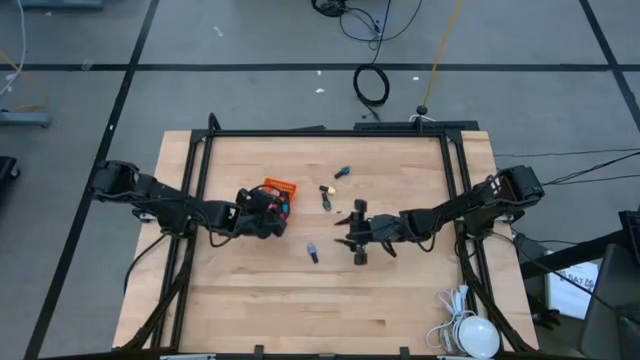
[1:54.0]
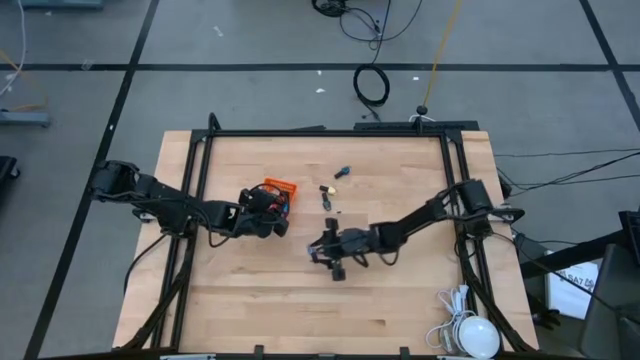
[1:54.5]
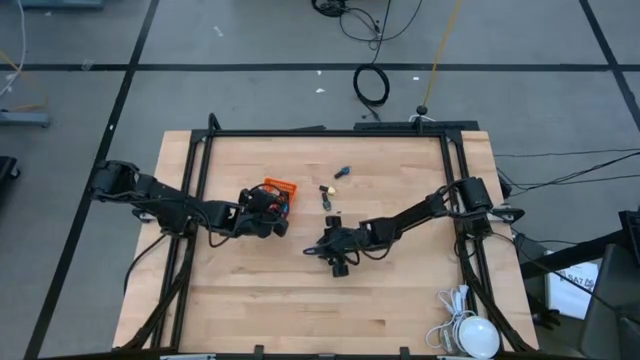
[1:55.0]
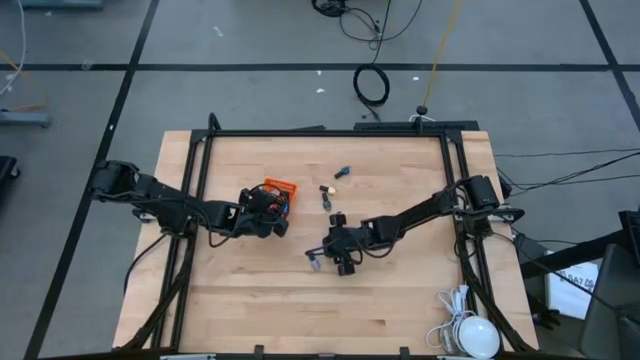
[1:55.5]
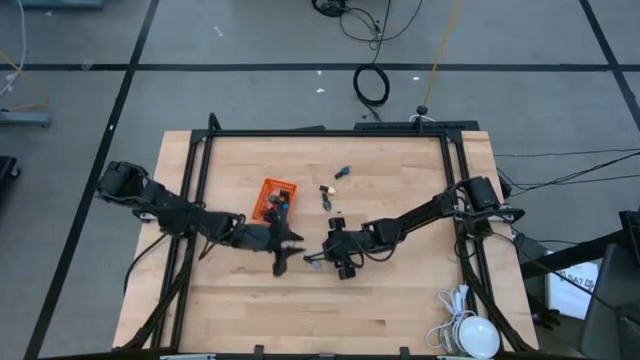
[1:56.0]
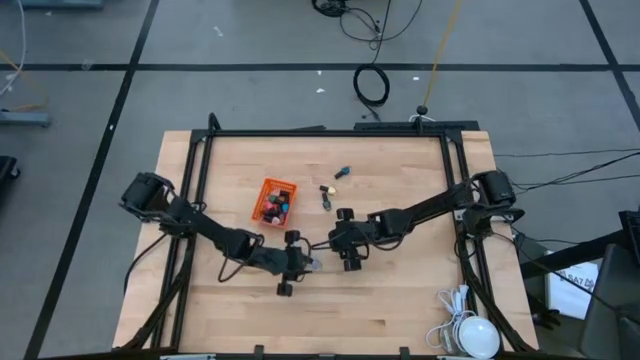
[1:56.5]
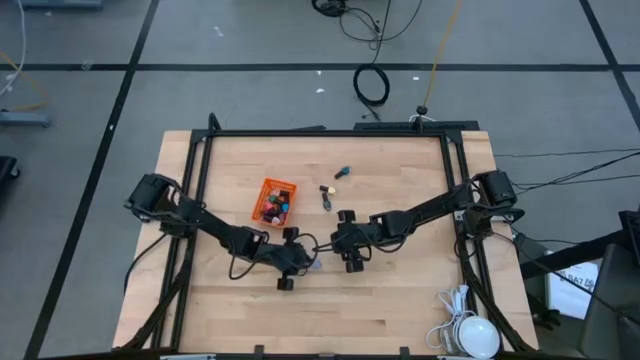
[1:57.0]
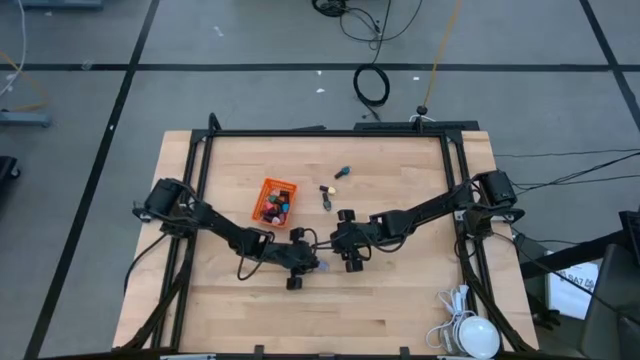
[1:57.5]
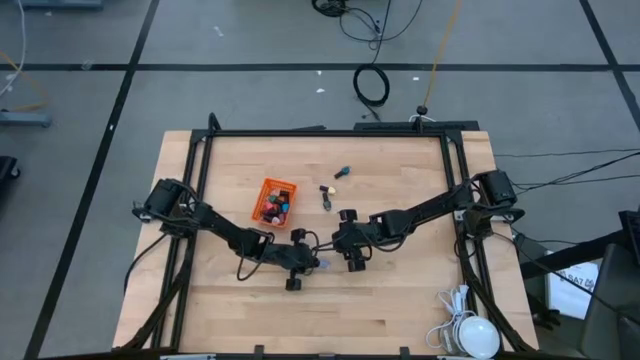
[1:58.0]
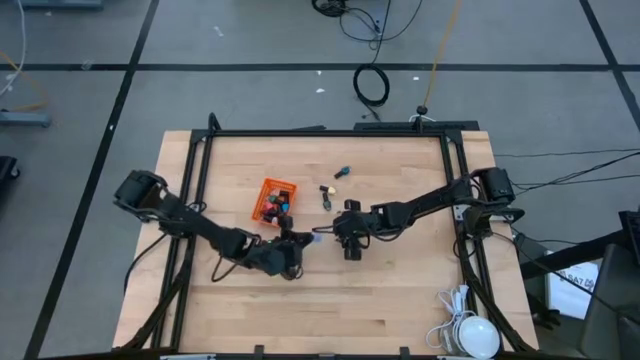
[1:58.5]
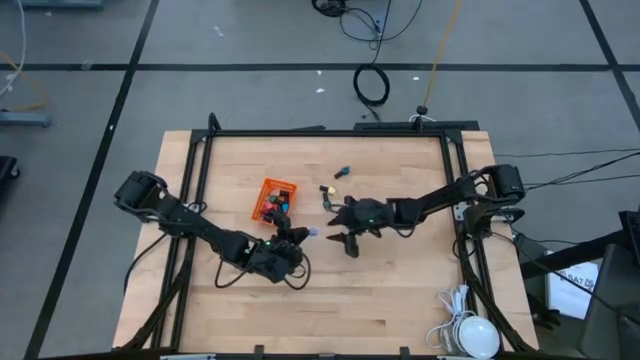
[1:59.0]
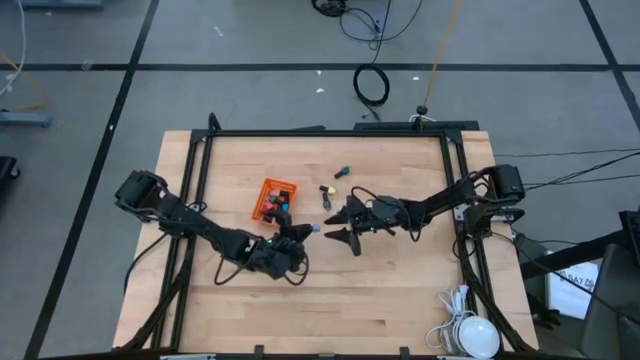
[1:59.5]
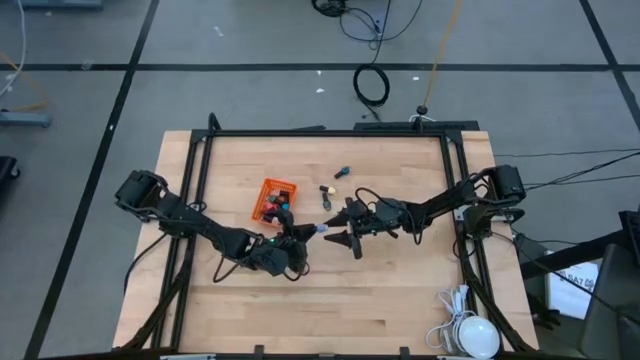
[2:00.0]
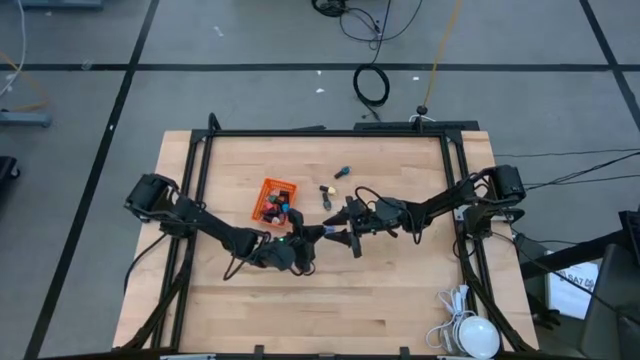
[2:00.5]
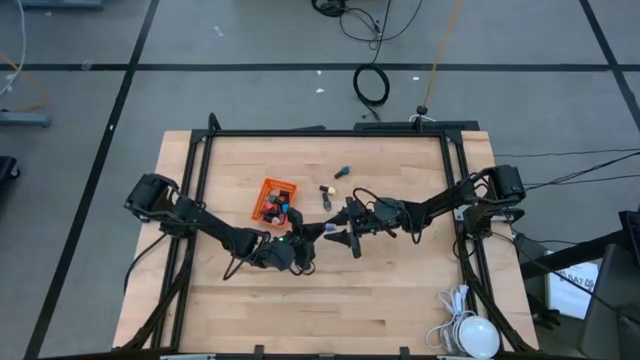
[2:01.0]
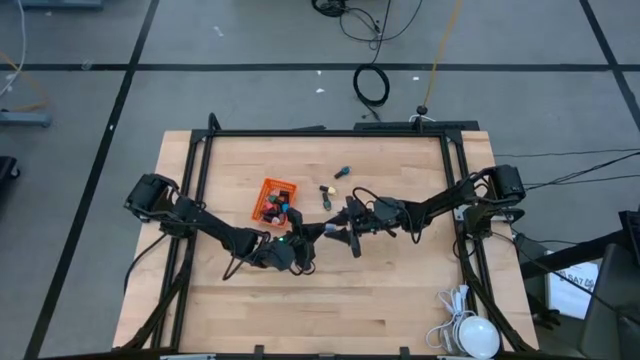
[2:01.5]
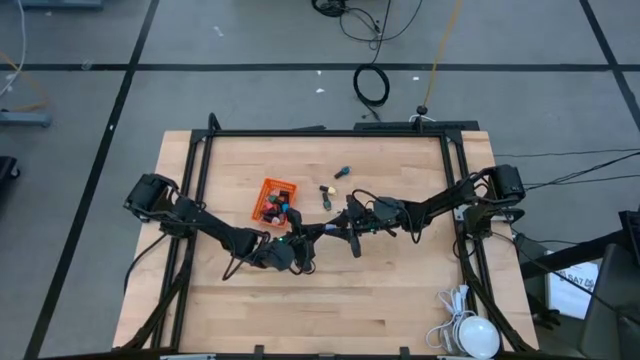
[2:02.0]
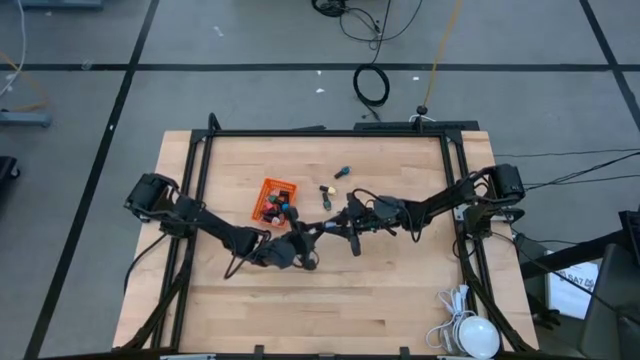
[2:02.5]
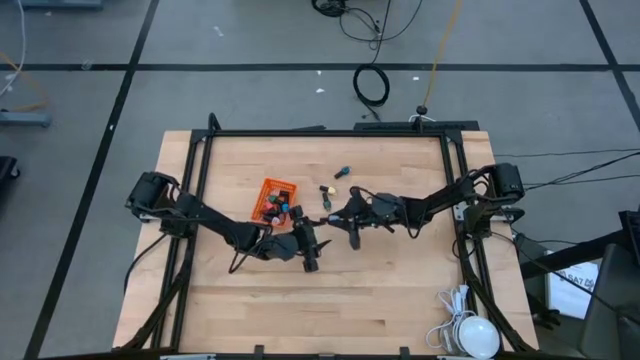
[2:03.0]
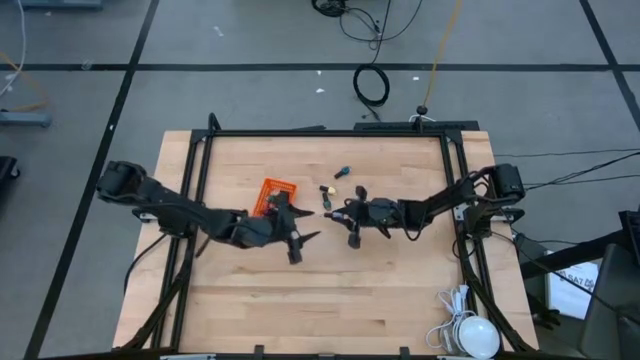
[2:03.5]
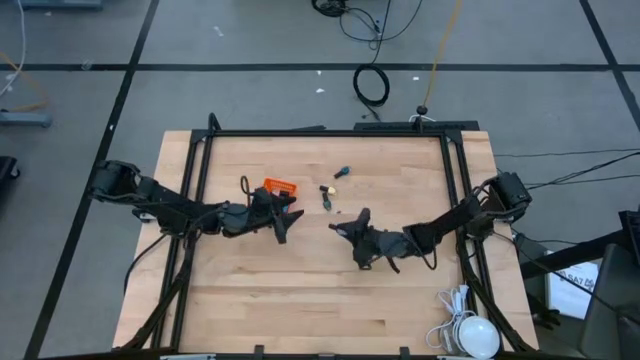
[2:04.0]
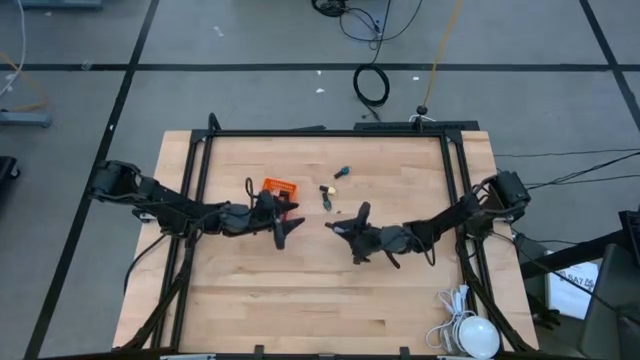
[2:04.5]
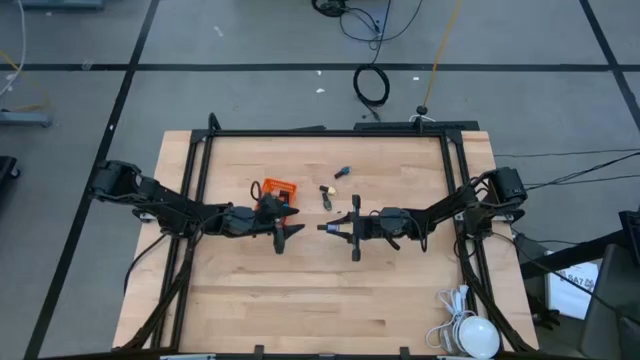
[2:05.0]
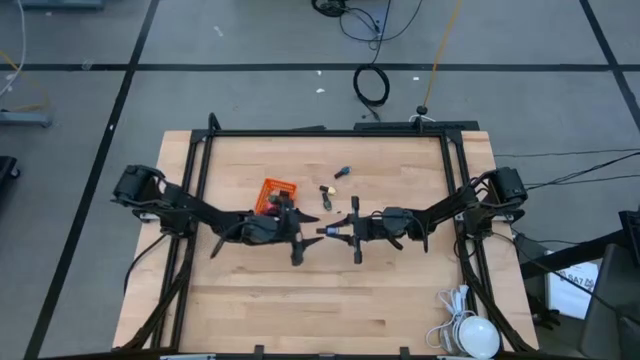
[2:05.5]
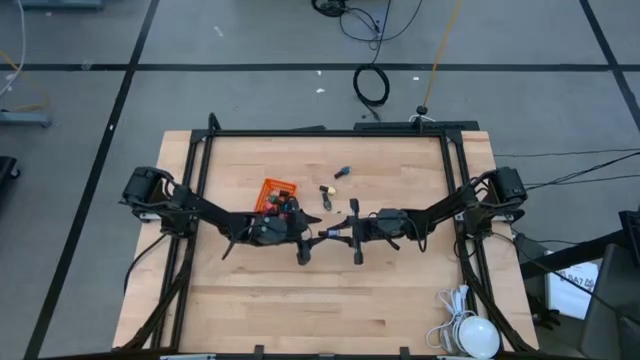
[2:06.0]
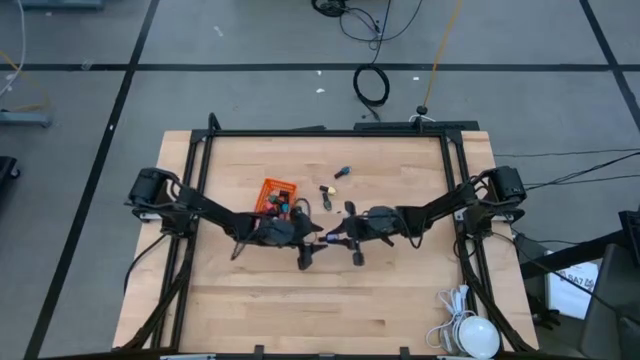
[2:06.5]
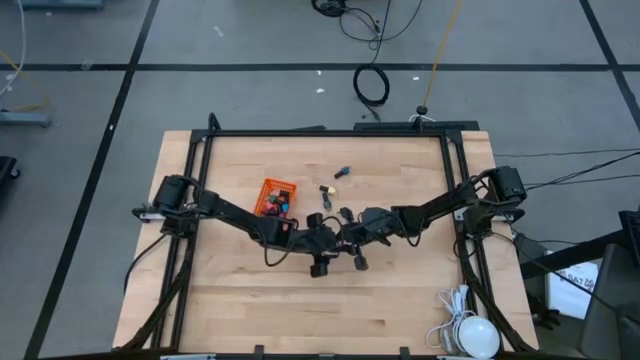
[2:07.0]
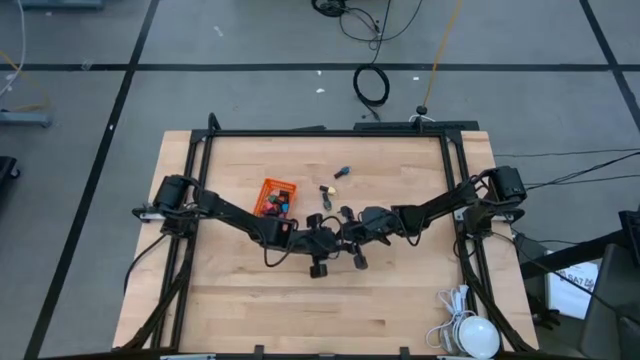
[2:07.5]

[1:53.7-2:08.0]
Task: Pick & Place Nail Polish
Put the purple nail polish into the orange basket

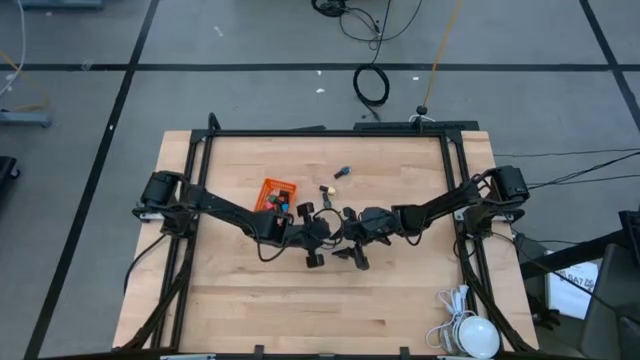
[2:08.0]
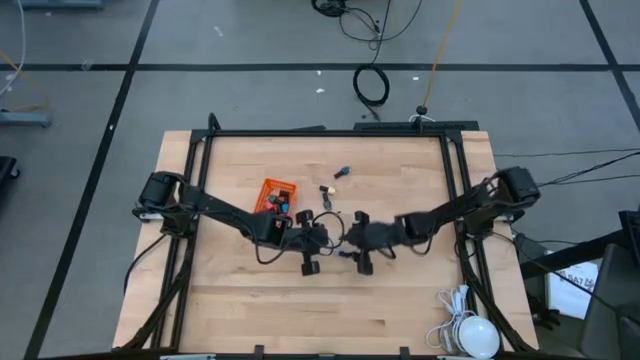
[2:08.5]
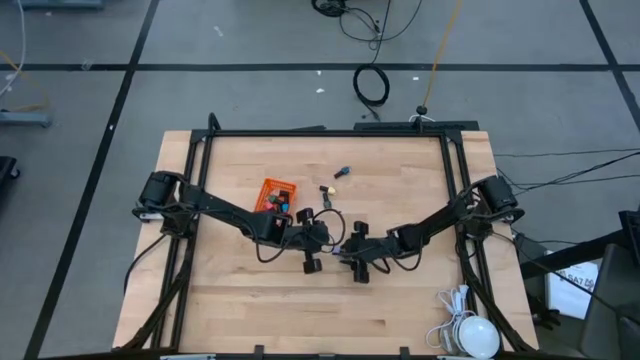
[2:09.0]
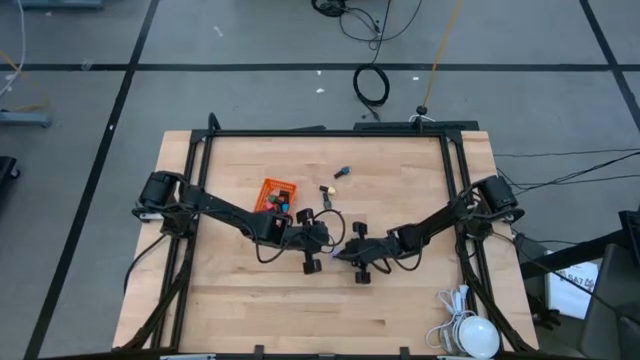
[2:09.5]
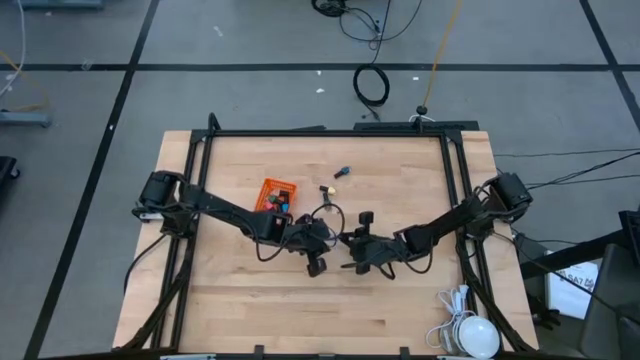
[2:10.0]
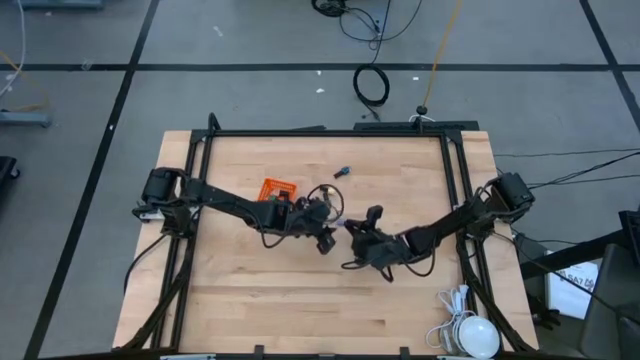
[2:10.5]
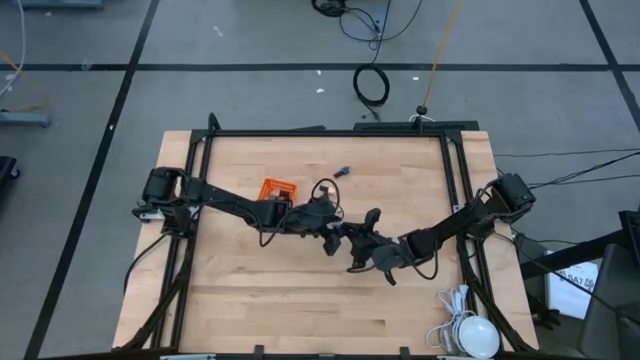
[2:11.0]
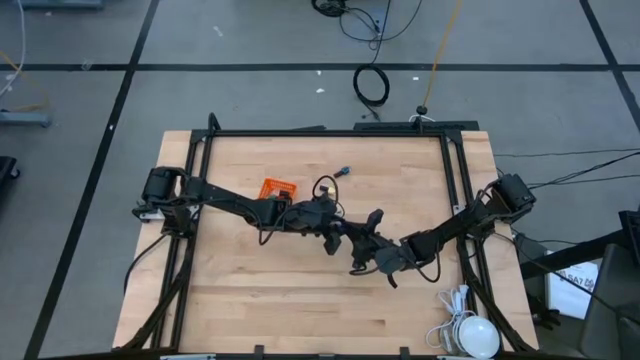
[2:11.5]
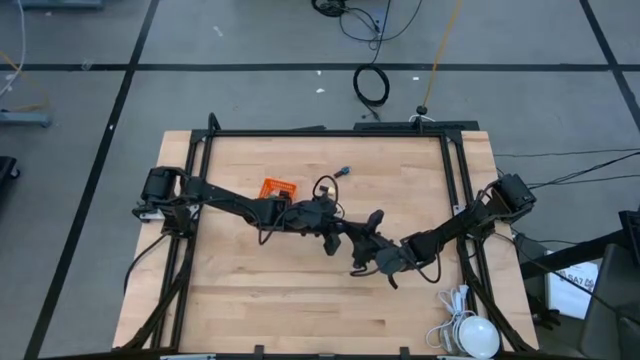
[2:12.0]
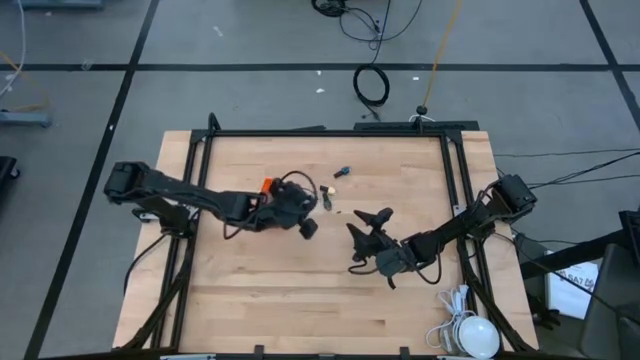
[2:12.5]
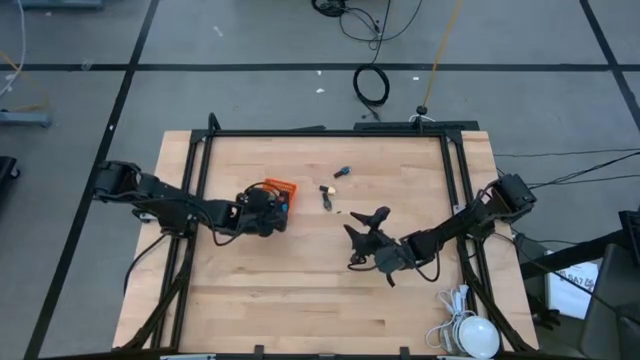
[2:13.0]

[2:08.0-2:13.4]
Put the purple nail polish into the orange basket

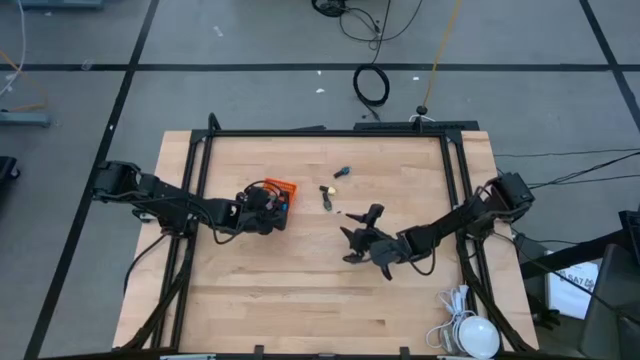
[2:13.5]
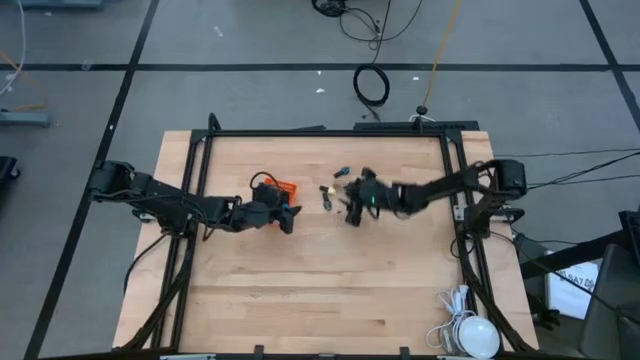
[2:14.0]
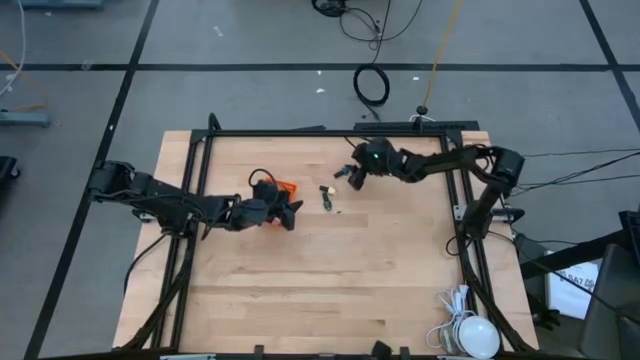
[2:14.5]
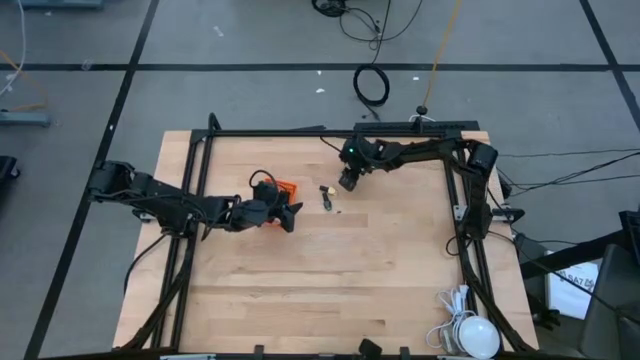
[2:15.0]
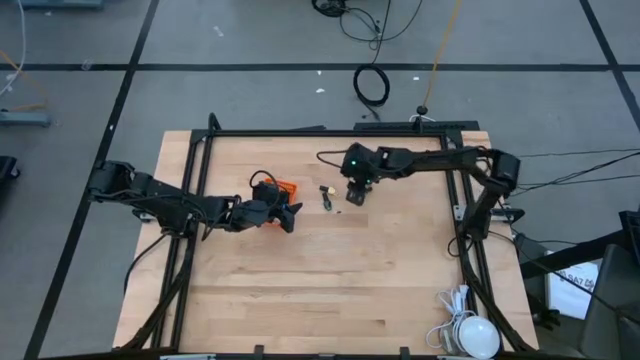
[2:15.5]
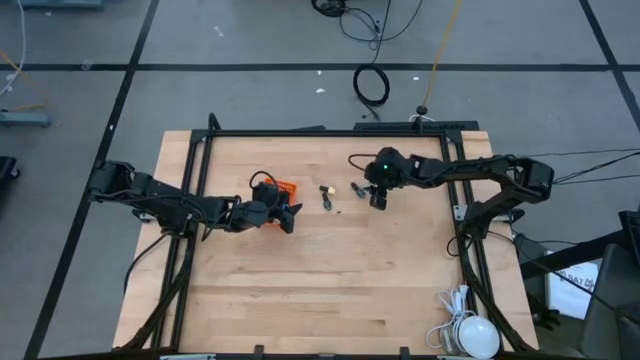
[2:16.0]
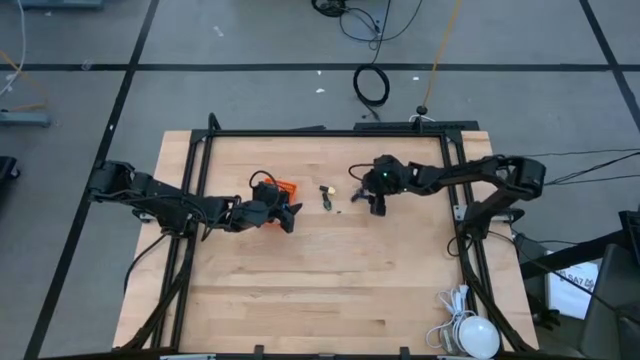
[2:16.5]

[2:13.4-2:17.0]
Put the dark blue nail polish into the orange basket
